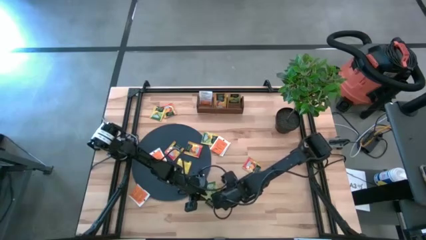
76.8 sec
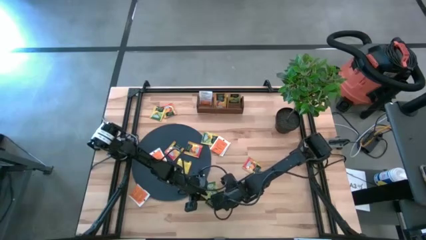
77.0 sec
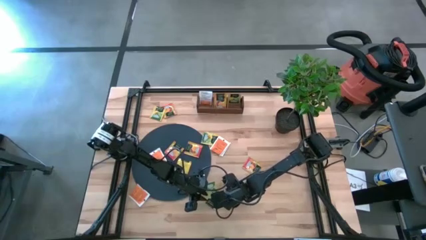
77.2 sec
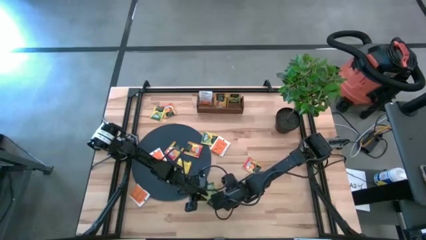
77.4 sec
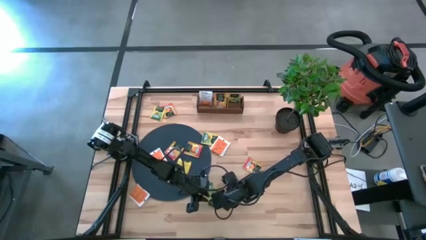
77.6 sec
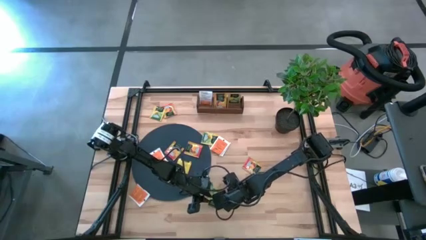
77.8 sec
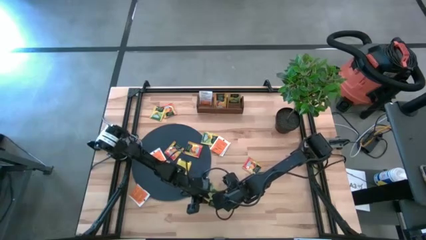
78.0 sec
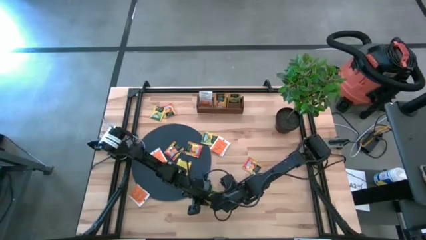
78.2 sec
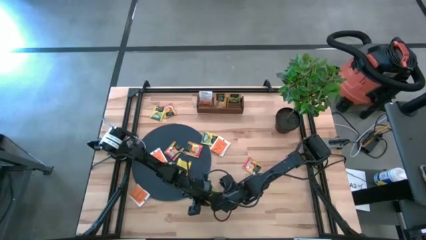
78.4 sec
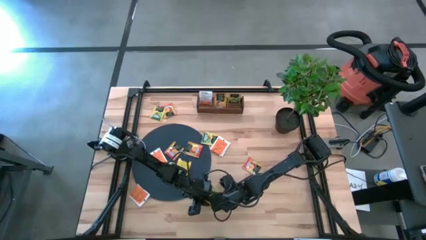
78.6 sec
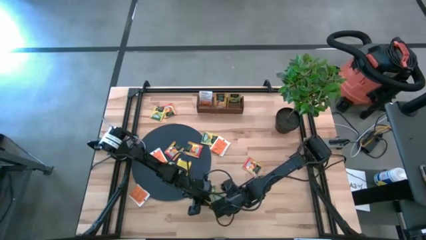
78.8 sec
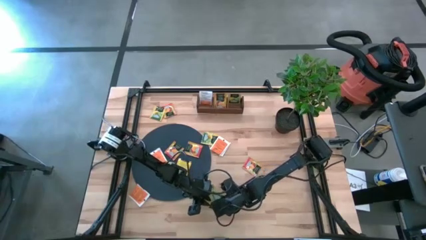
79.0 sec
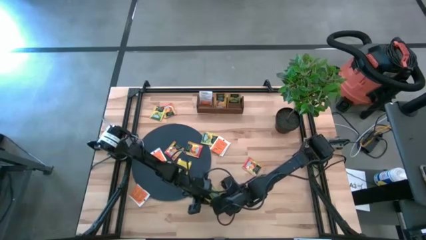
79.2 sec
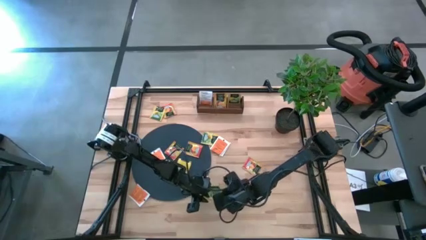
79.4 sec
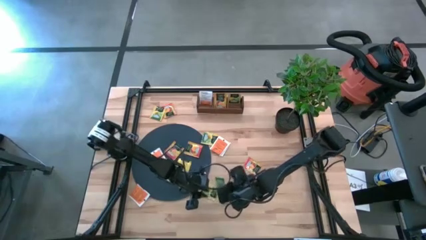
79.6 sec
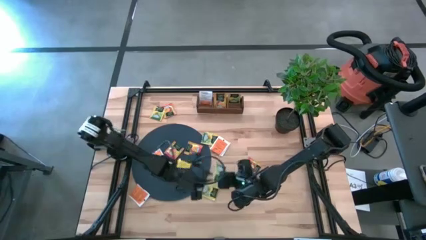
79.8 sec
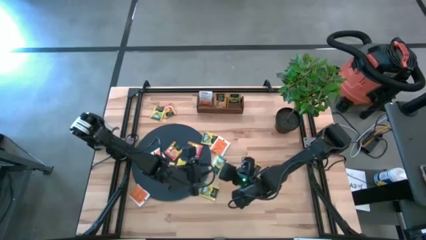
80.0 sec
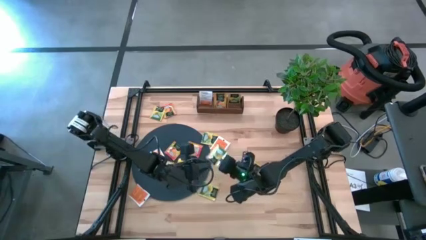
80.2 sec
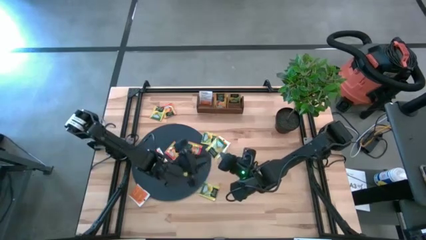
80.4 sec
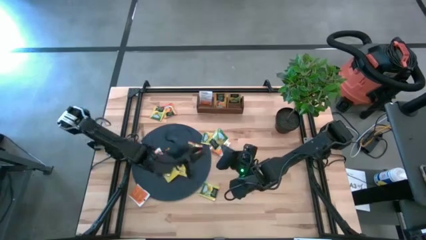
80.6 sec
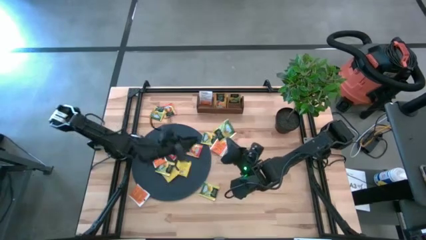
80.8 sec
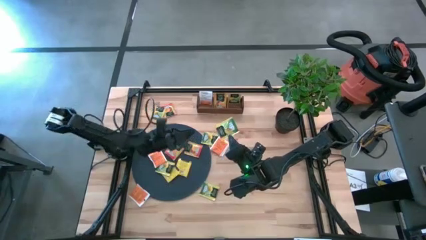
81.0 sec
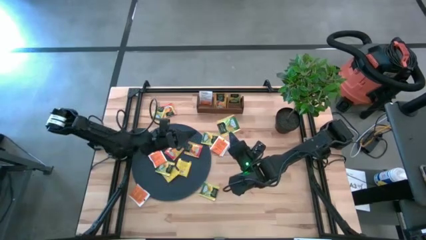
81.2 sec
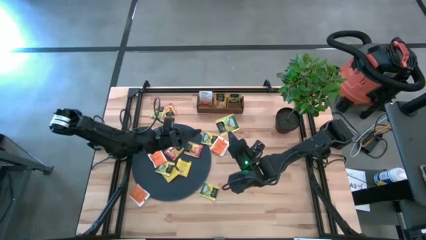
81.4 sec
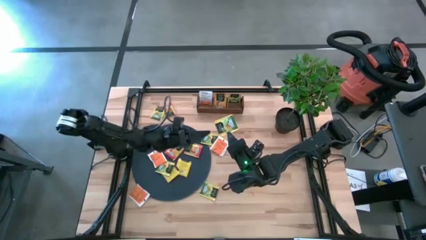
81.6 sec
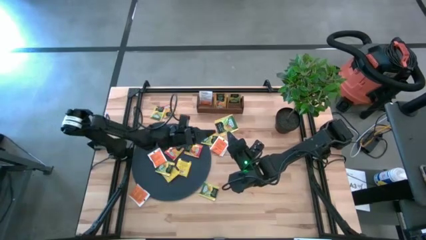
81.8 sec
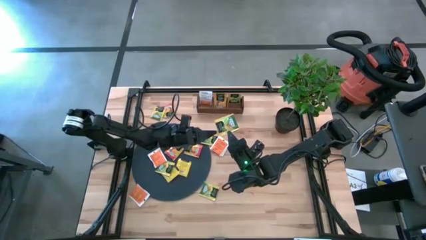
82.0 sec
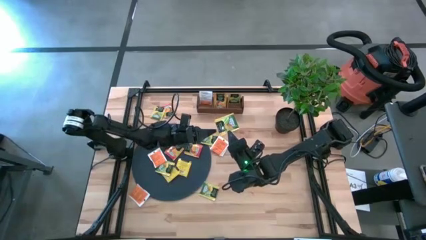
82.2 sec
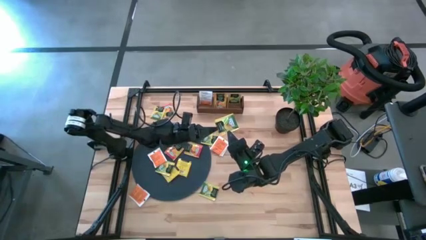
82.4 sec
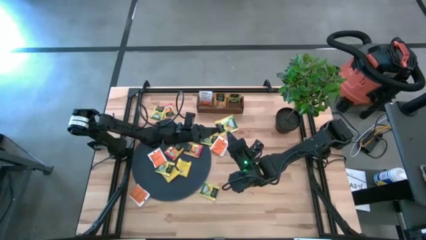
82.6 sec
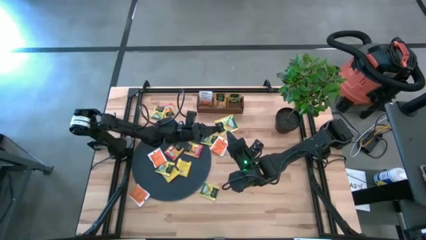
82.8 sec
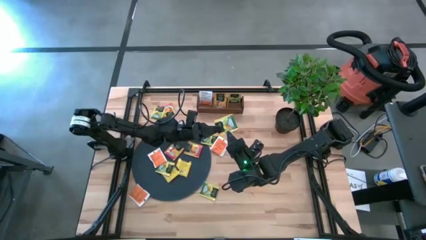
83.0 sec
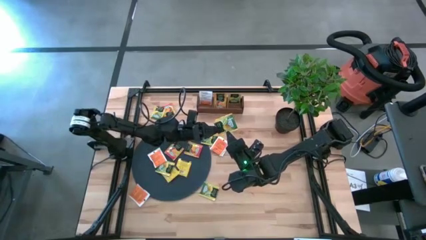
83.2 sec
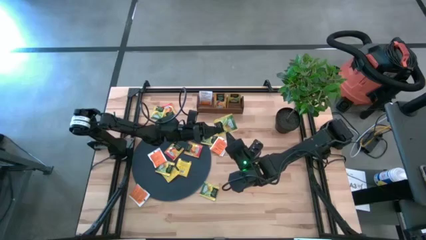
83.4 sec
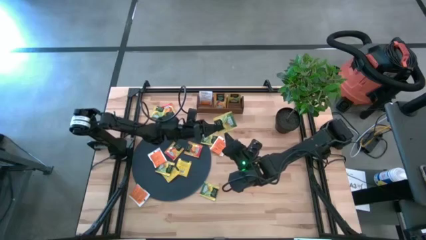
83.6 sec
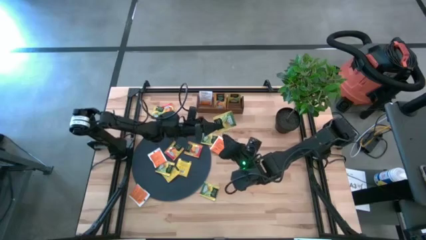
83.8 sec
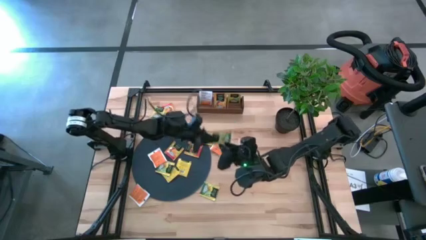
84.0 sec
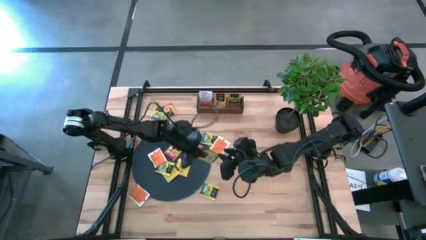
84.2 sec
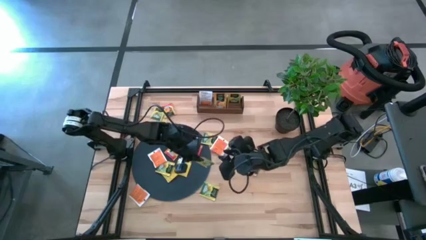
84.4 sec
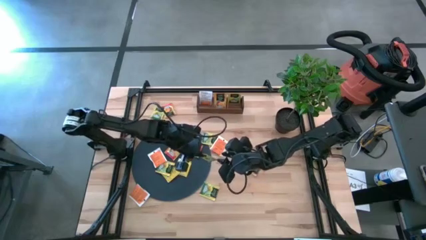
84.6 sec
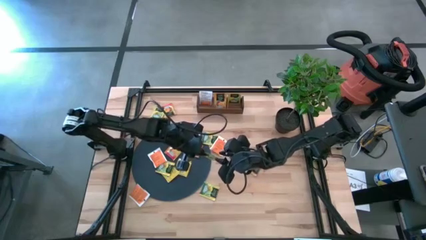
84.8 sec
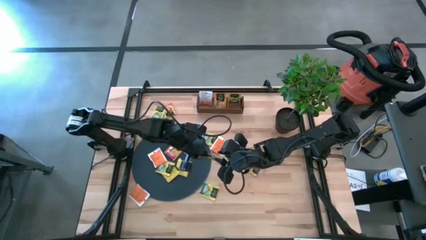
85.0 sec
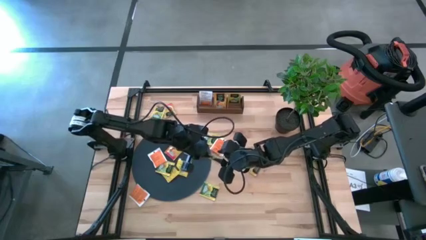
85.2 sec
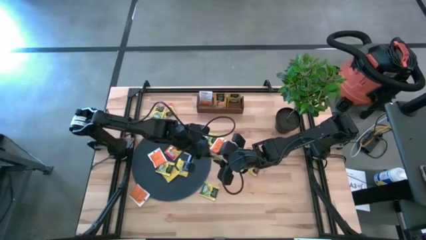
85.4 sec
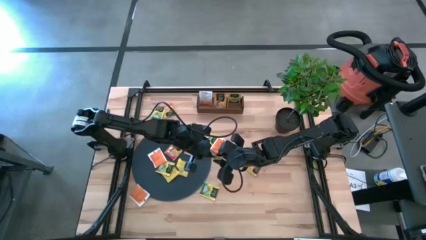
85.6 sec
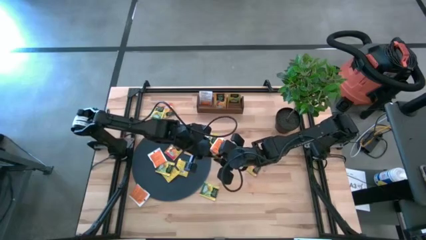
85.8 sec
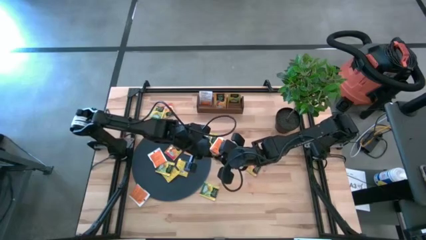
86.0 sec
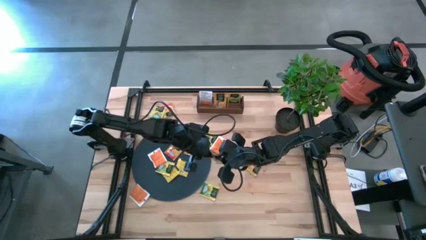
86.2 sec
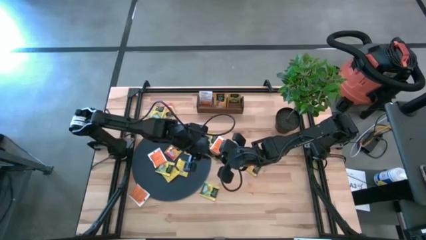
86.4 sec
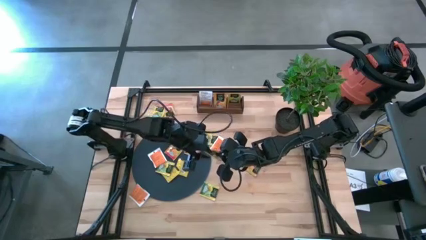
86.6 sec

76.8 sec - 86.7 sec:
Task: Pick & Place Tea
Put the green tea bag into the right section of the wooden organizer

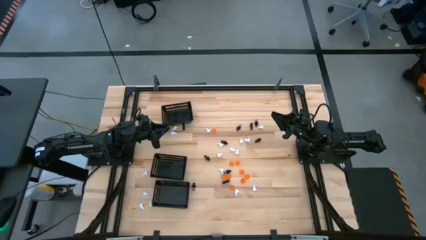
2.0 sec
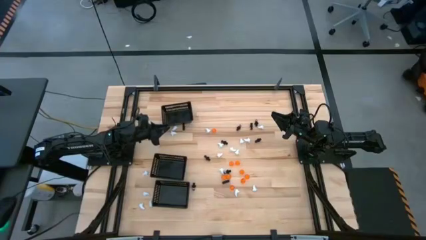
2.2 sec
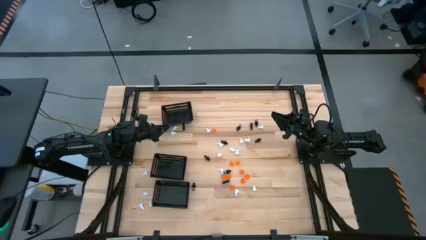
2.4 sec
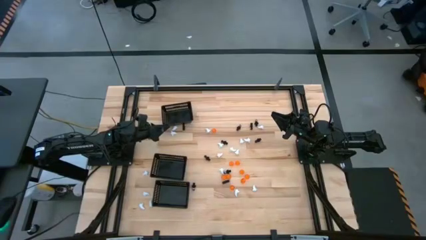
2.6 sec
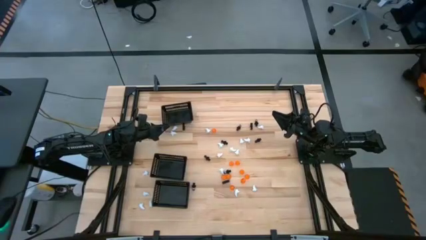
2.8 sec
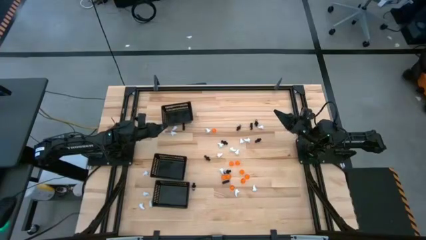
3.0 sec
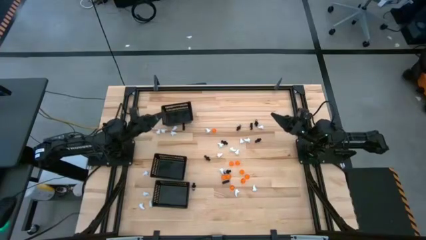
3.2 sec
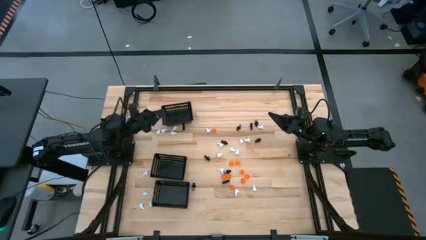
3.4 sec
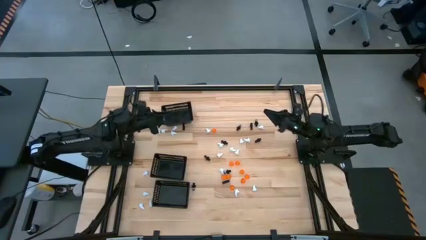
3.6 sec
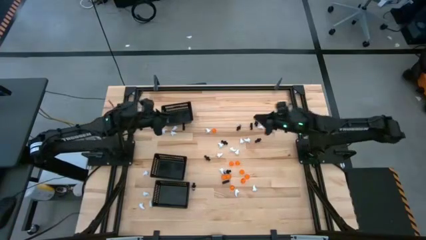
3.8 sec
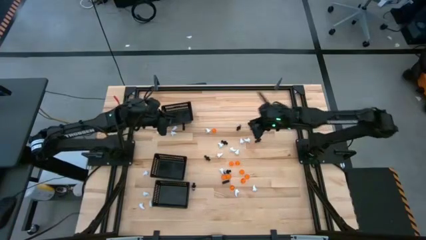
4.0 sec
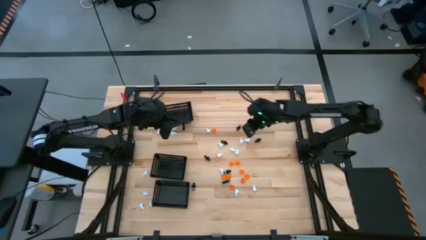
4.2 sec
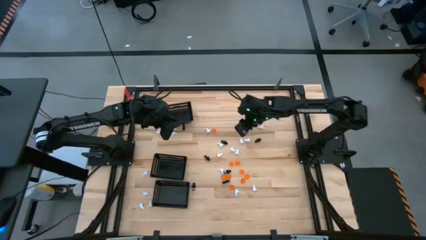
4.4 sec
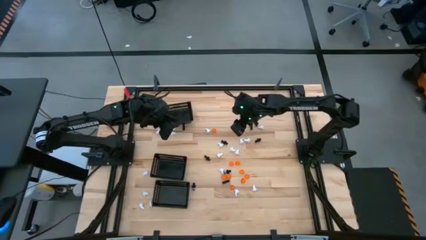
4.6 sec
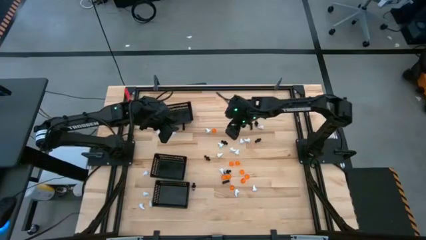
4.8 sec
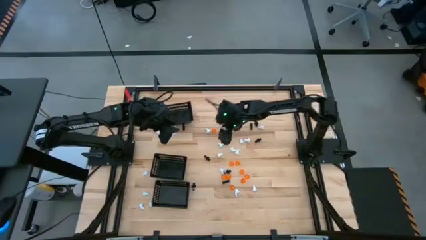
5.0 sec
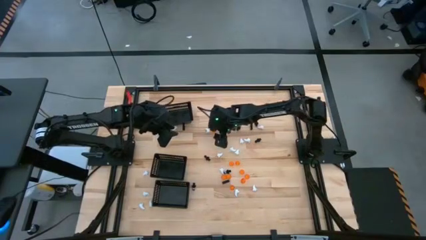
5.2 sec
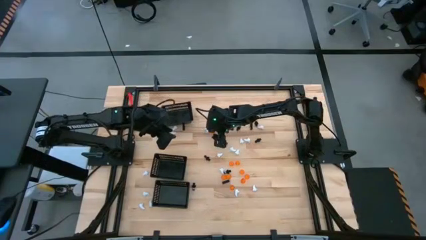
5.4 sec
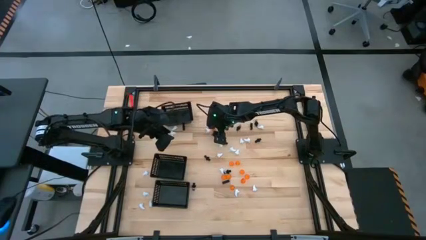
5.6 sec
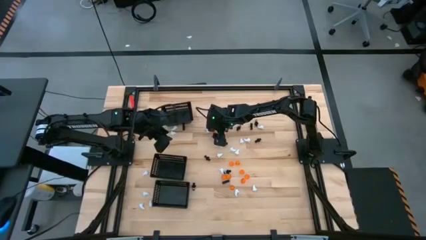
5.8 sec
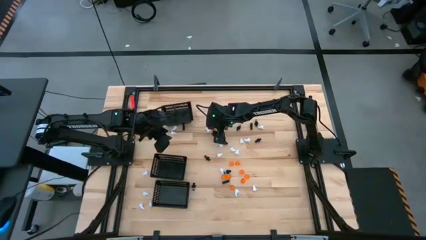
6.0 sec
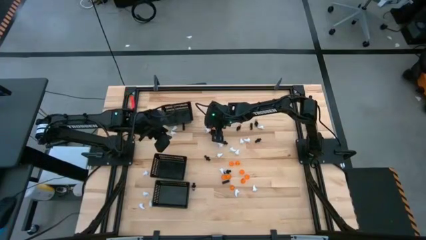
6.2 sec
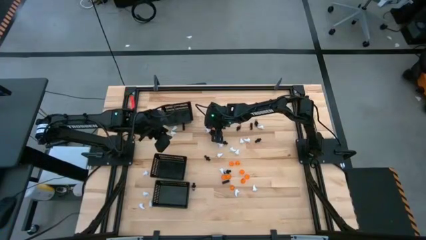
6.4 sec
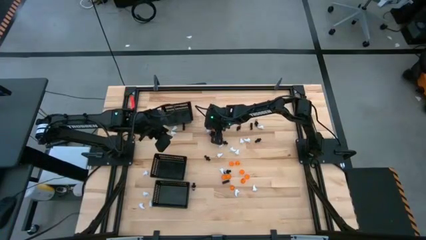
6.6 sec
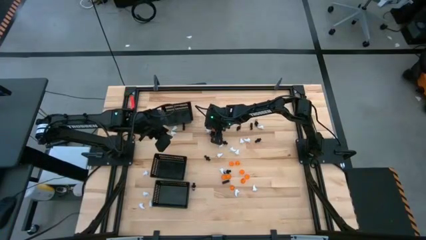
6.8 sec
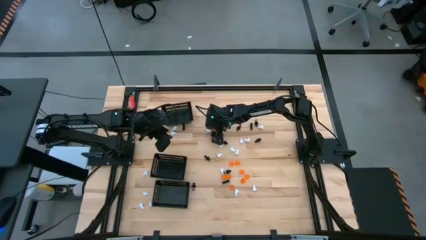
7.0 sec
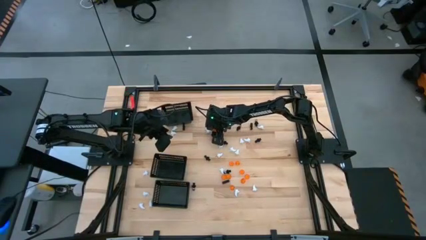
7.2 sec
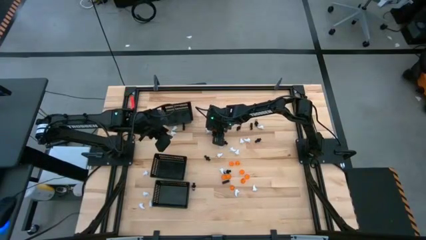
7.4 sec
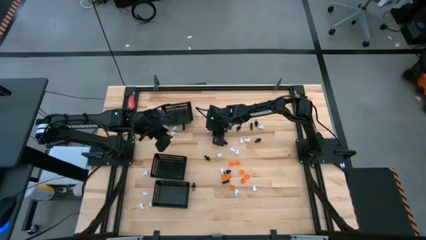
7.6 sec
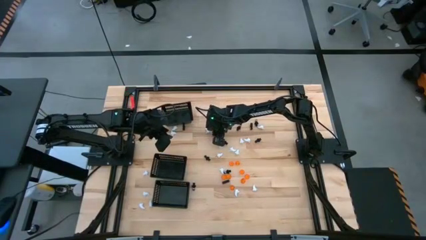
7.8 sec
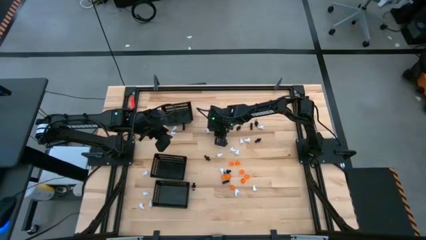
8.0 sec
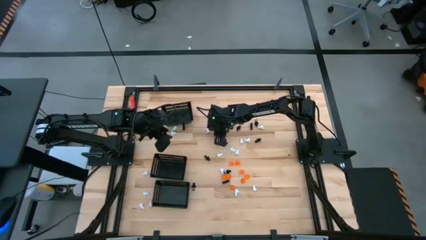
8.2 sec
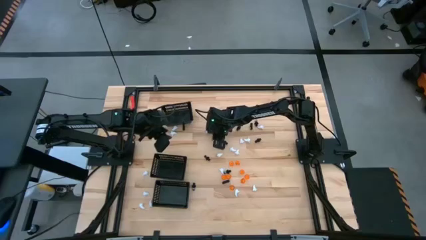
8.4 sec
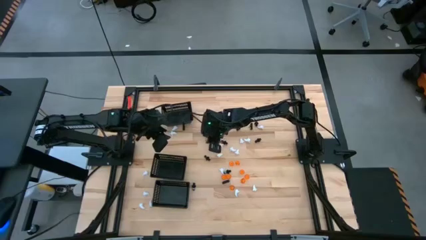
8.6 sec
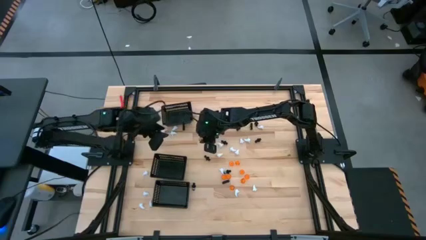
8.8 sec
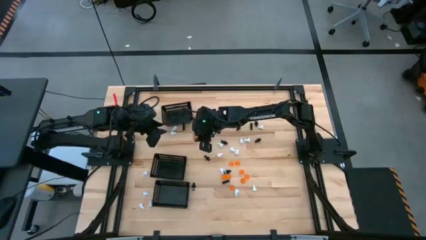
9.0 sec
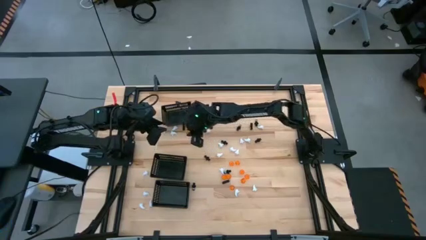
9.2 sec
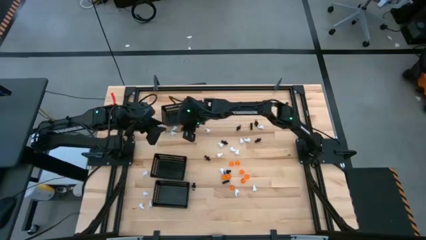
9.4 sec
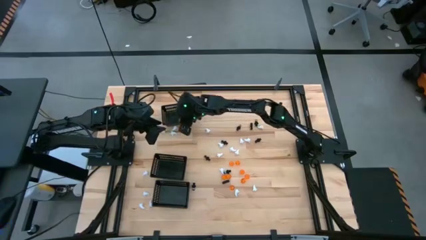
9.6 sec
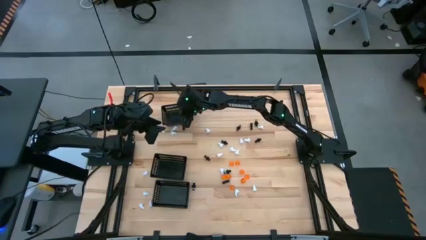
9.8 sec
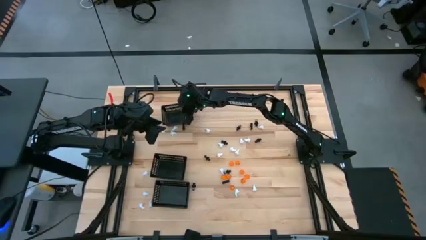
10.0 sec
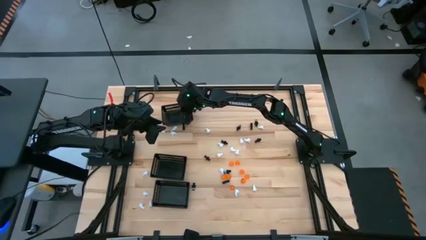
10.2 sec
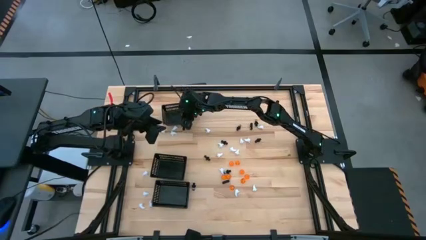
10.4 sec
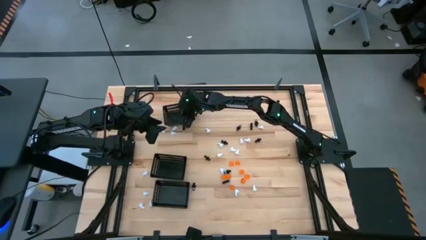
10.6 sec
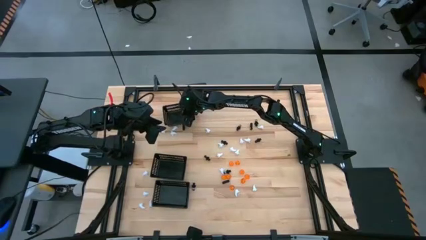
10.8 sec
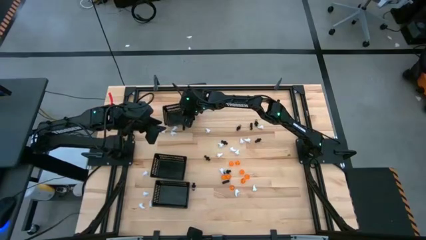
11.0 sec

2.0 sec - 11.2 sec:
Task: Sort Halloween decoration
Put the orange pumpkin toy into the top black bin
